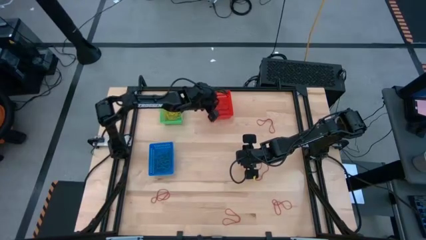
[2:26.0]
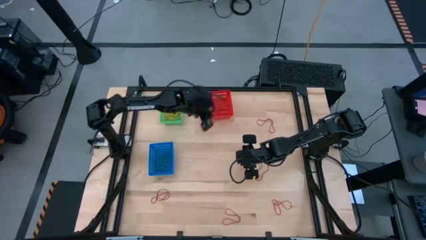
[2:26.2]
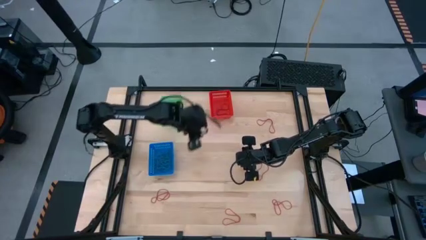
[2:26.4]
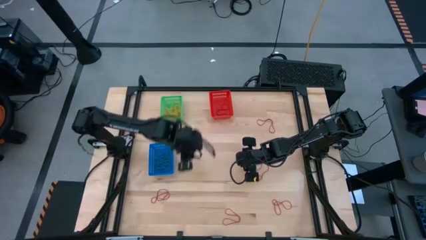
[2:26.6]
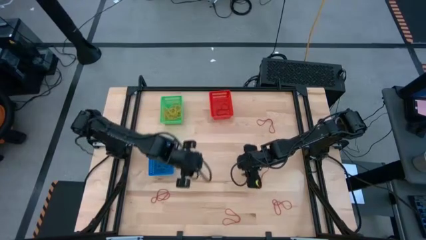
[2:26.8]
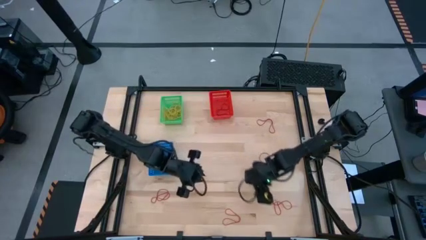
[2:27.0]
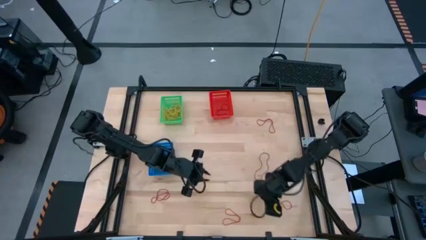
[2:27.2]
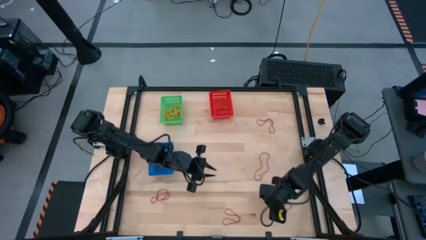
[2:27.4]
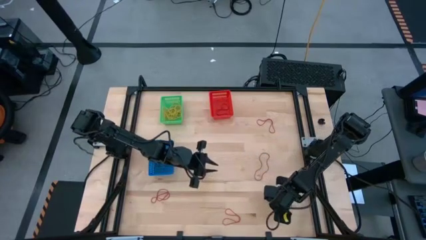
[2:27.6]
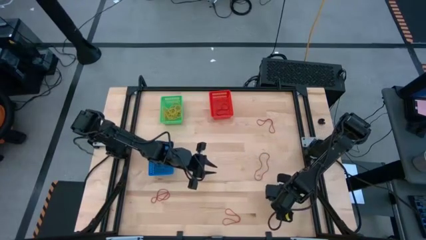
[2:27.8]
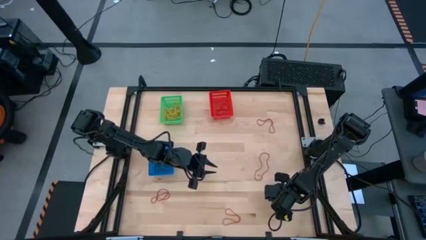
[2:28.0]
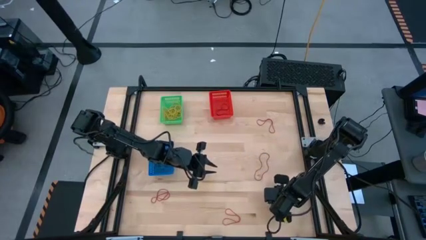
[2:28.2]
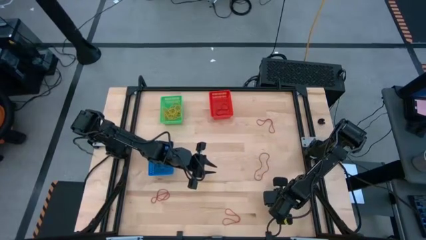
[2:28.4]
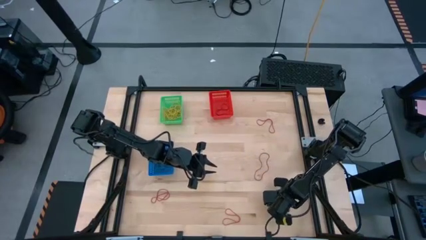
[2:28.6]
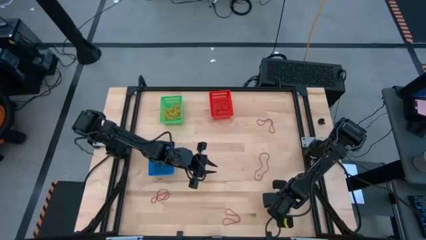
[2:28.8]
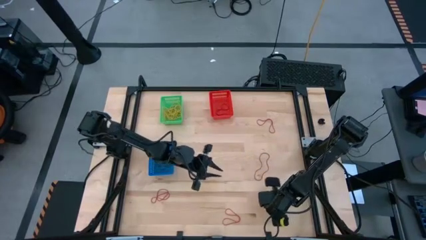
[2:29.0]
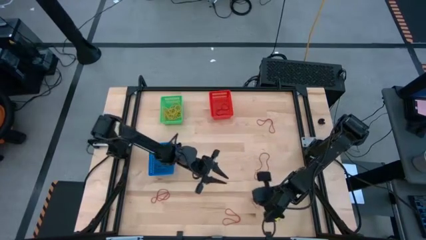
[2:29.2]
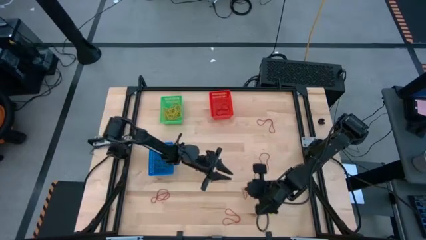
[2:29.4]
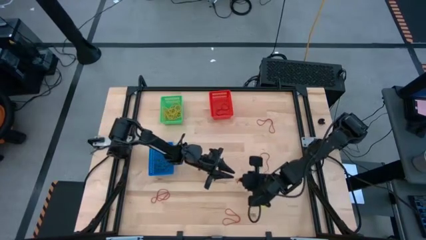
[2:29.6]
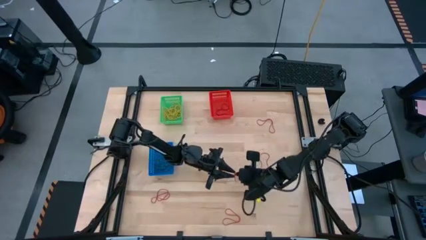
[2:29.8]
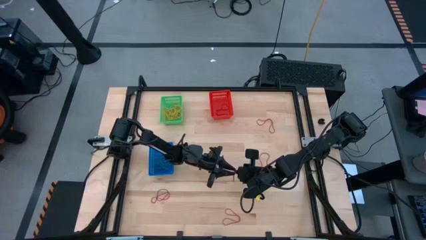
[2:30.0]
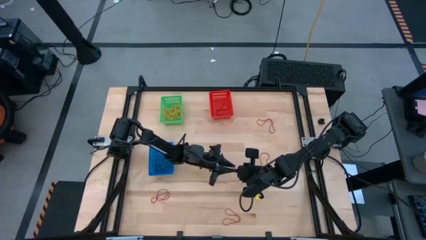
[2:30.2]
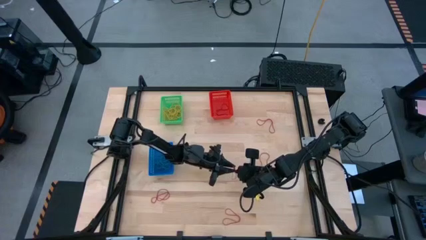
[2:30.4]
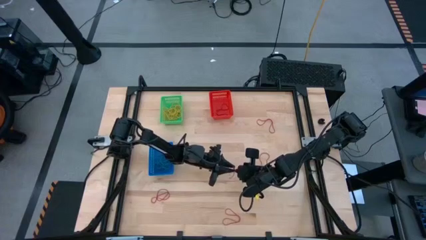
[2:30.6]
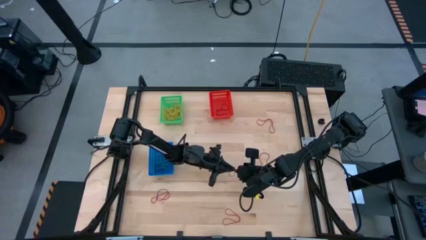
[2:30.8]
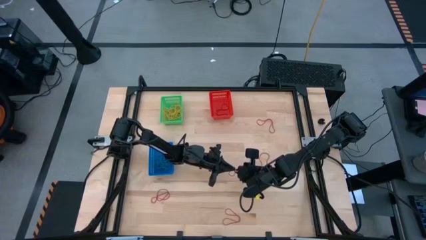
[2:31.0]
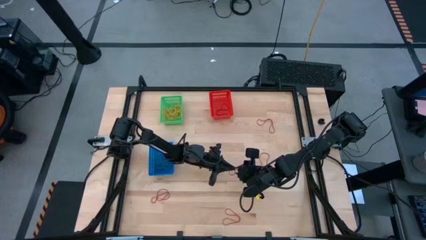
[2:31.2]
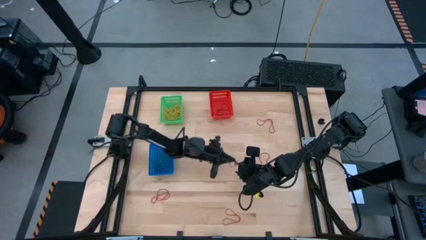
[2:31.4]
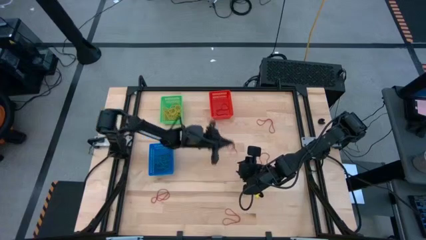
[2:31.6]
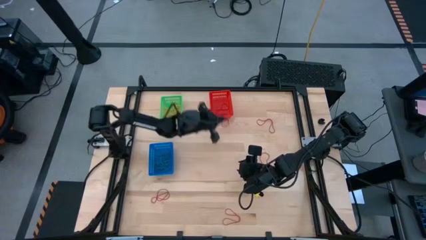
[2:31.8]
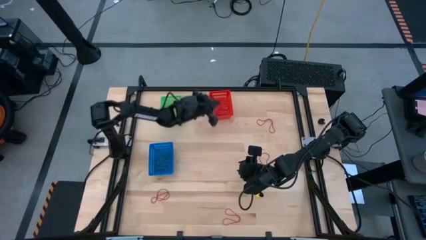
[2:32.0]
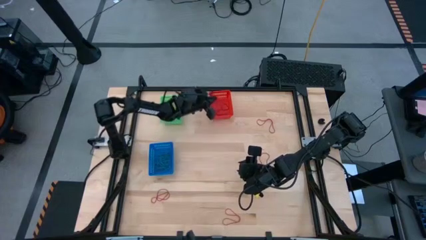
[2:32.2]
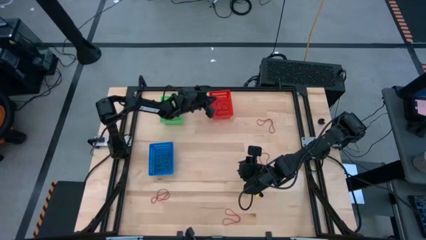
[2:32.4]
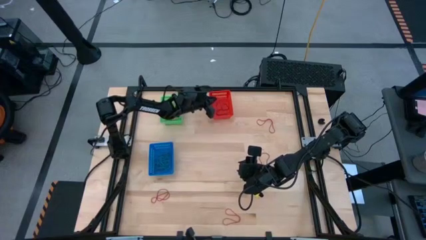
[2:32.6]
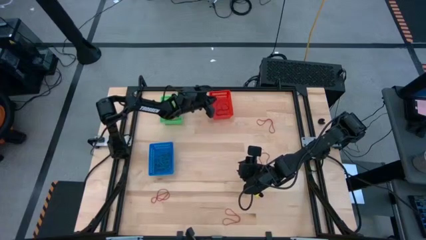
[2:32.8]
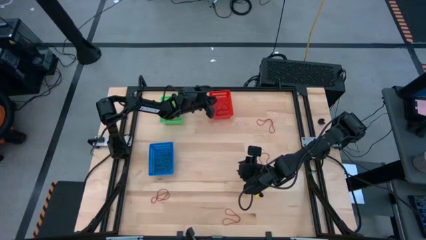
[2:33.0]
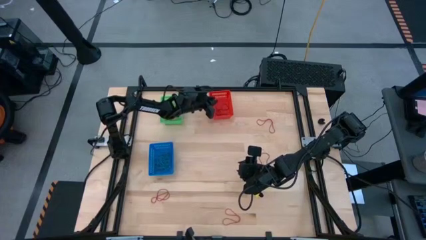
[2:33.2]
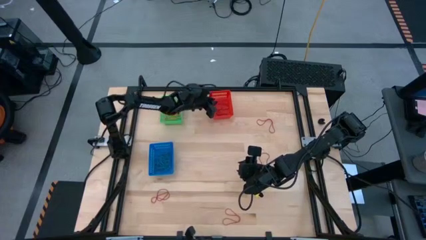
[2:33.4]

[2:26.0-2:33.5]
Task: Sort rubber bands into baskets
Put the red rubber band into the red bin

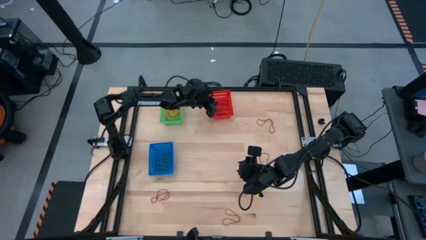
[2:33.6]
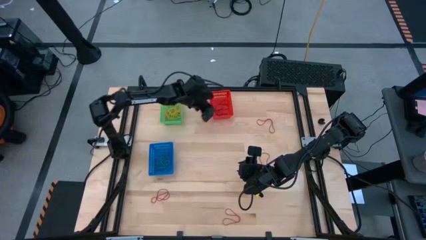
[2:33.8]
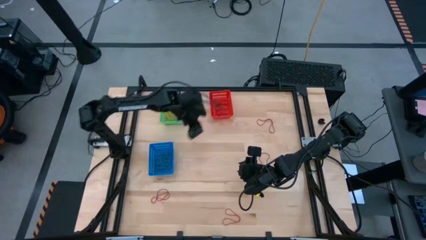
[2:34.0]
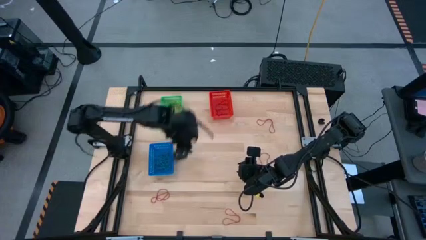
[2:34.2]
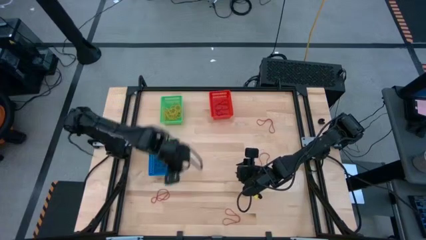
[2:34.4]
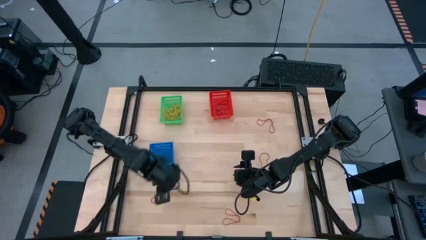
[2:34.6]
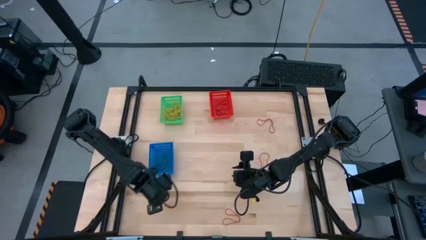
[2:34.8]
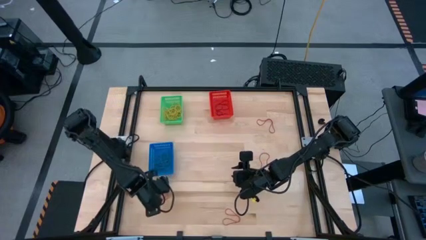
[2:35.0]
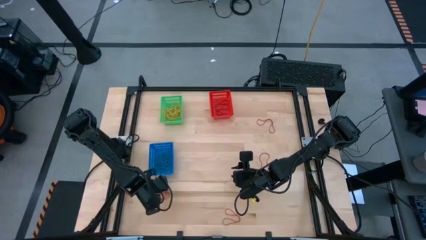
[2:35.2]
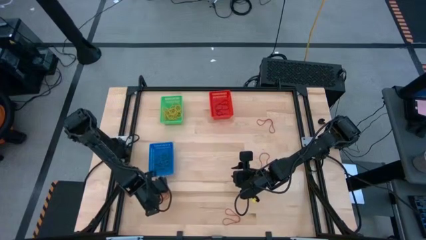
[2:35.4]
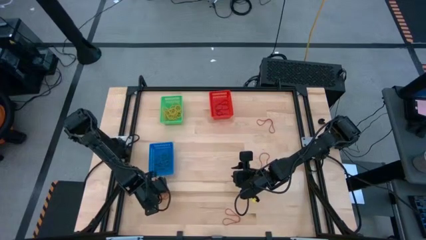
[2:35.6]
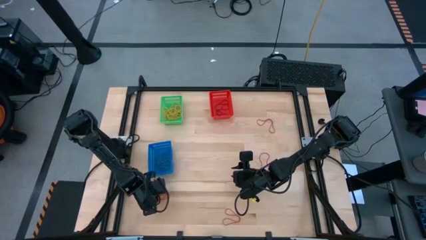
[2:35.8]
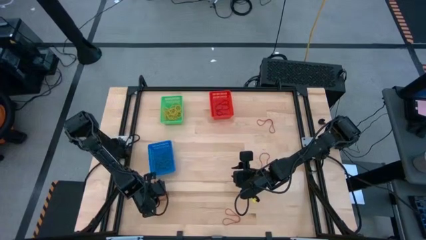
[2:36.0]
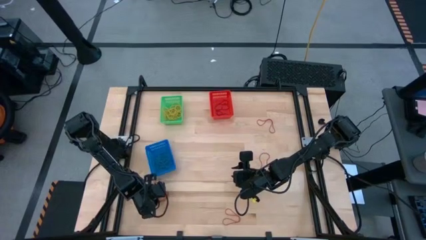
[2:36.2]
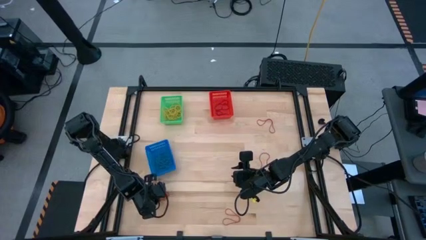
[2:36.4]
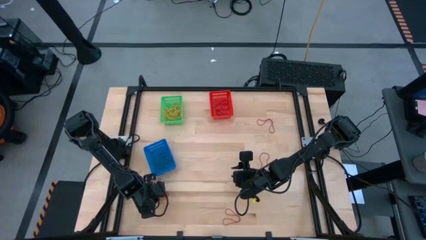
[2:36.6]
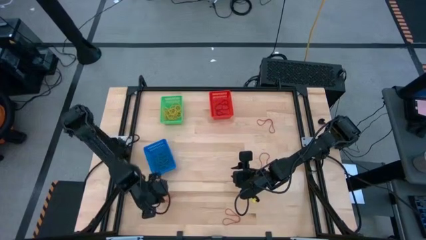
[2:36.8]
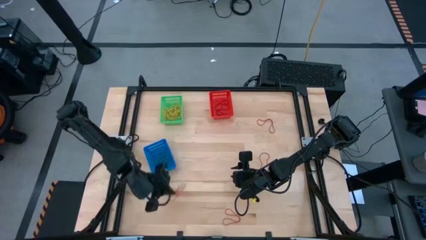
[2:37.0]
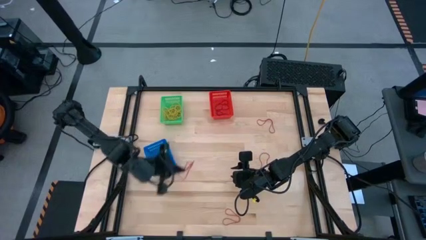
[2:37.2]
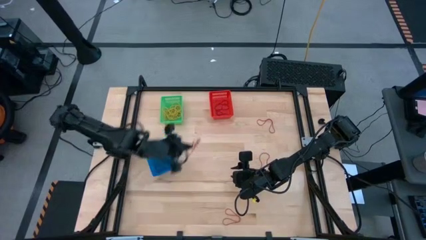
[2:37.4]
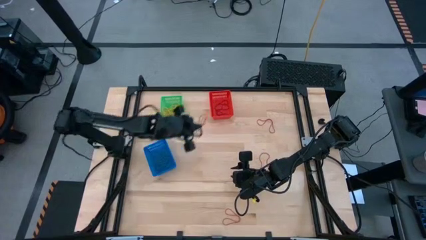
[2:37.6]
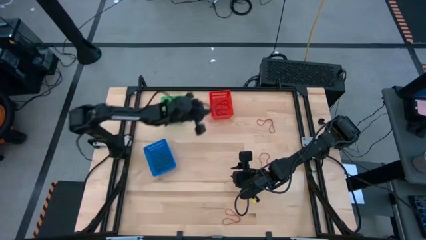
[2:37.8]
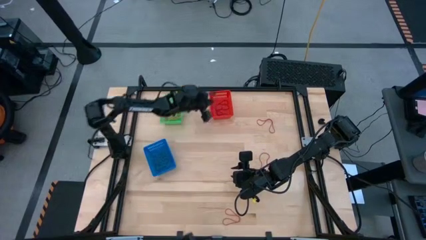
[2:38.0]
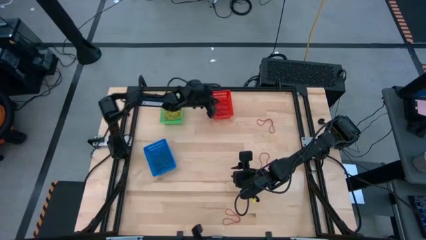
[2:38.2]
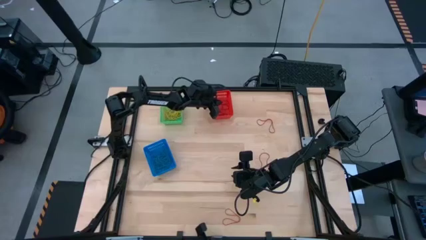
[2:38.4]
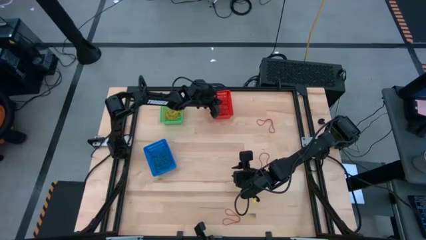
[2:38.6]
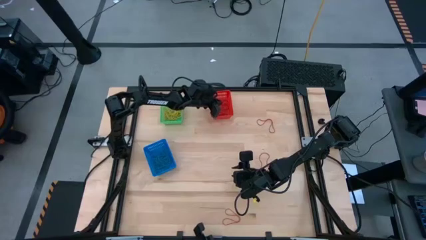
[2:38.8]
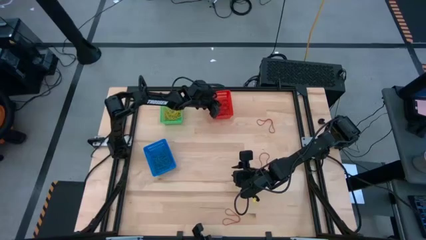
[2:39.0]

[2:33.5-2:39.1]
Put the red rubber band into the red bin

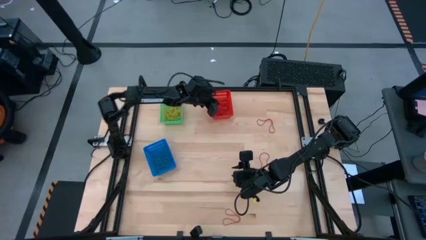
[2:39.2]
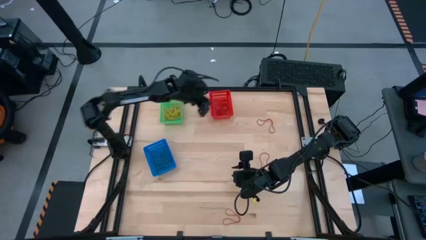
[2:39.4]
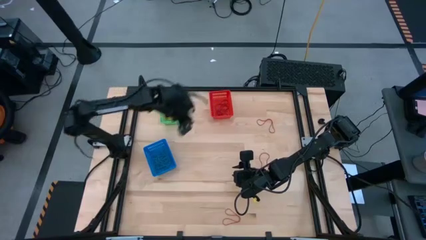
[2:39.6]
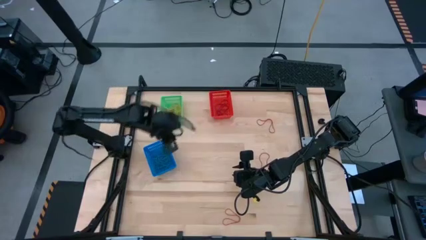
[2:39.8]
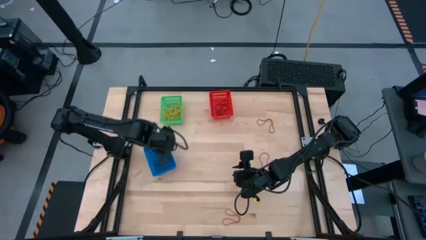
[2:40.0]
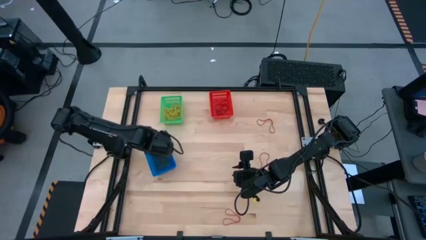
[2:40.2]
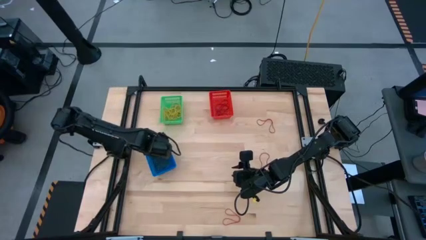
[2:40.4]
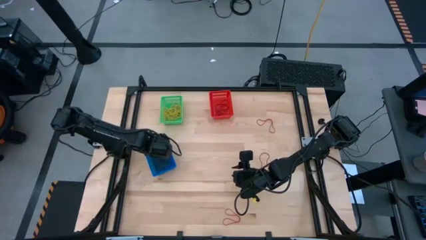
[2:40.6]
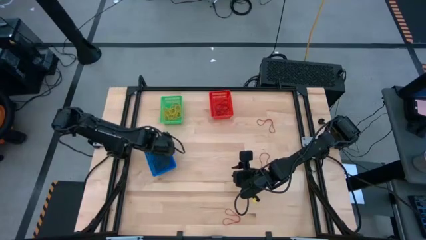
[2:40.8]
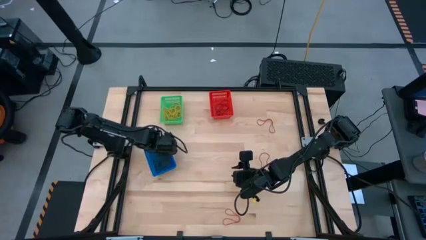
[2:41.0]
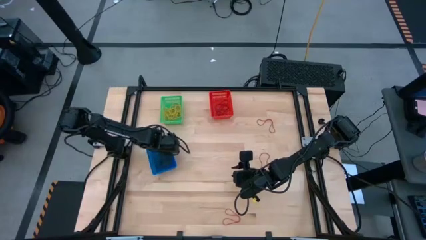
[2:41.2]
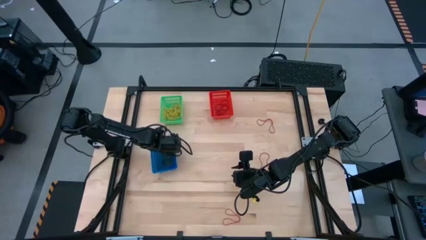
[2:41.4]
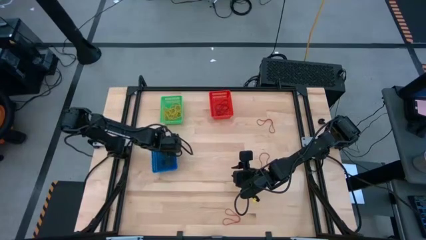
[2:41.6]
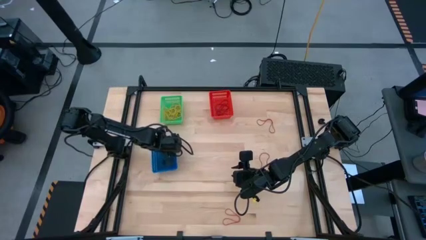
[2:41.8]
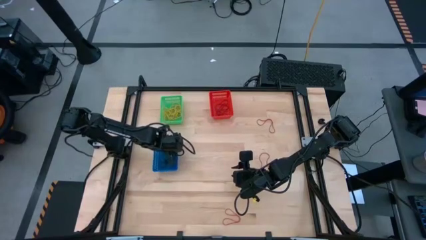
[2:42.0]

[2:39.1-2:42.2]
Adjust the blue bin on the table

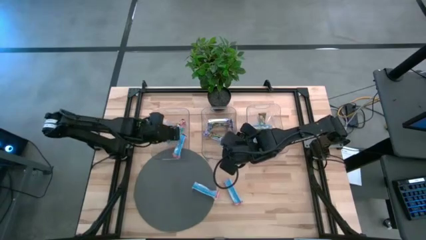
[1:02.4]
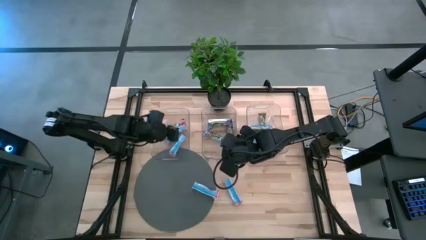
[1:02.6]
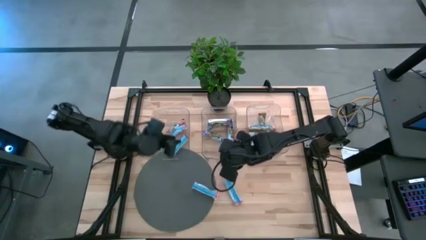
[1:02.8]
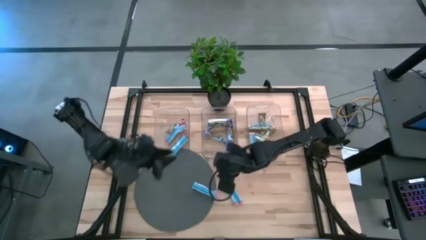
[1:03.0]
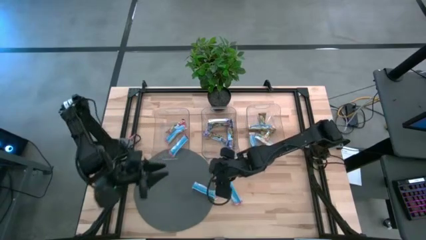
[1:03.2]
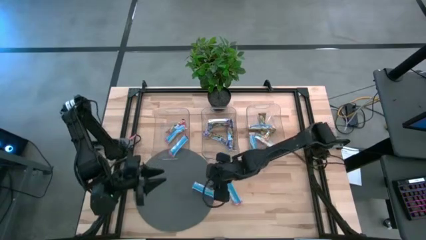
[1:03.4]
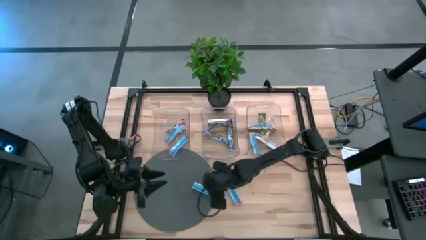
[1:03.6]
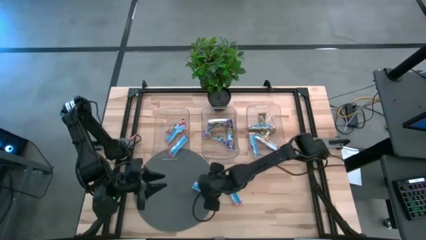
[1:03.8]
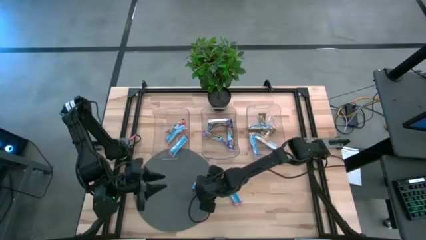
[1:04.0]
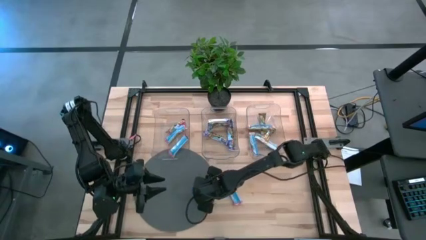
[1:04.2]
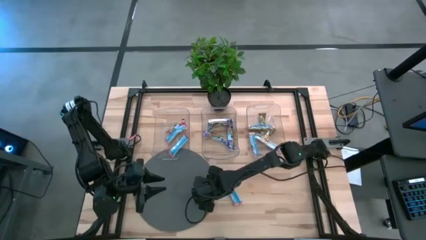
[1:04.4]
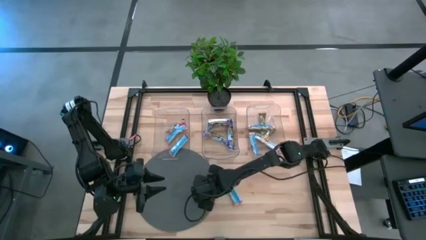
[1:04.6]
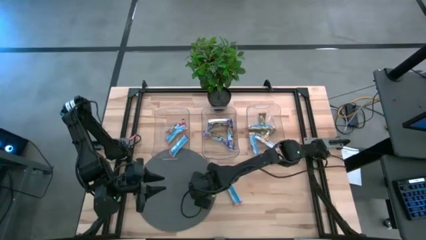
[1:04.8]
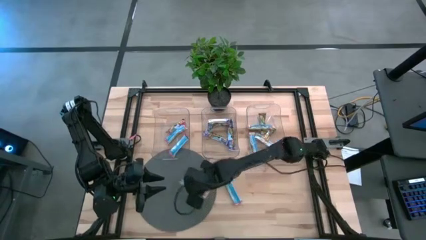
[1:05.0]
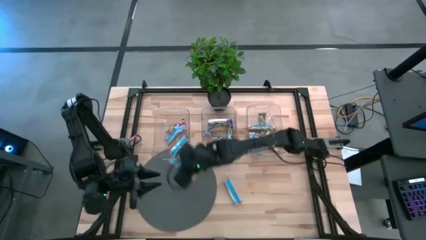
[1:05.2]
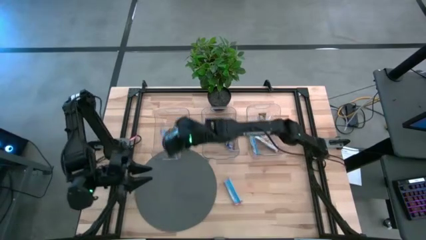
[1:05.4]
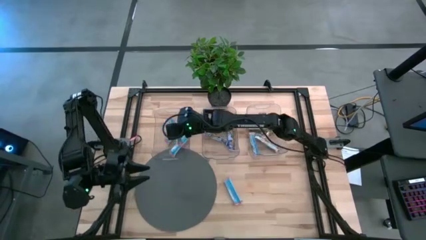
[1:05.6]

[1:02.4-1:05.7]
Task: Pick and place Granola Bars by type
Put the red granola bar into the left transparent bin
